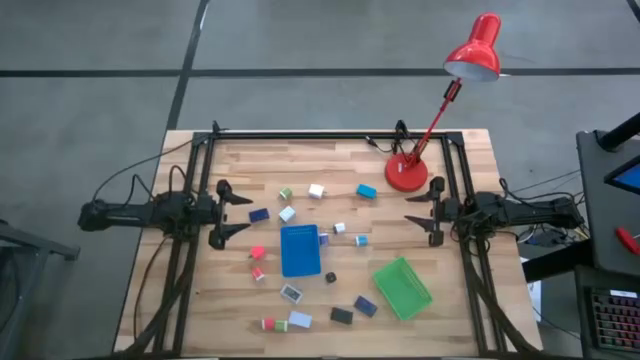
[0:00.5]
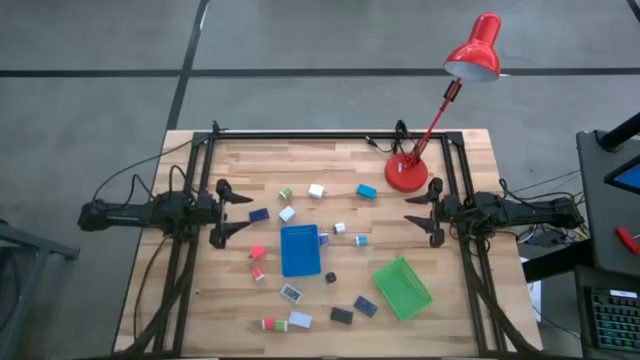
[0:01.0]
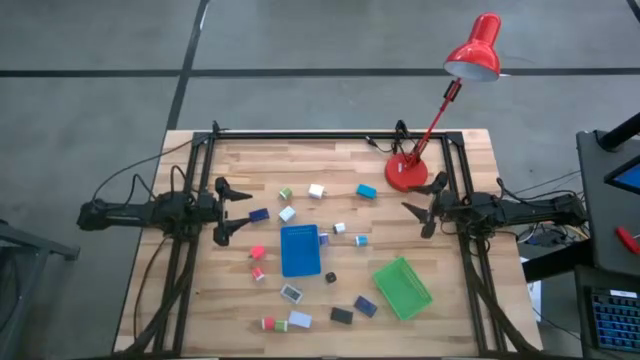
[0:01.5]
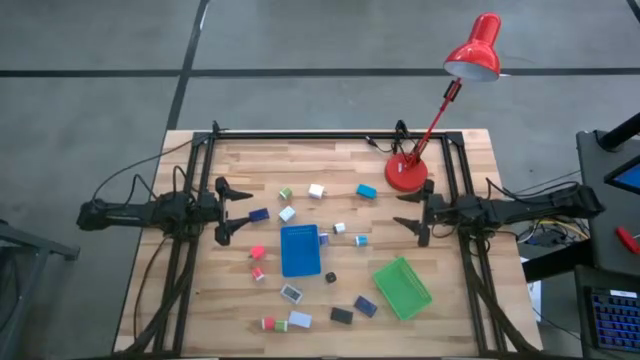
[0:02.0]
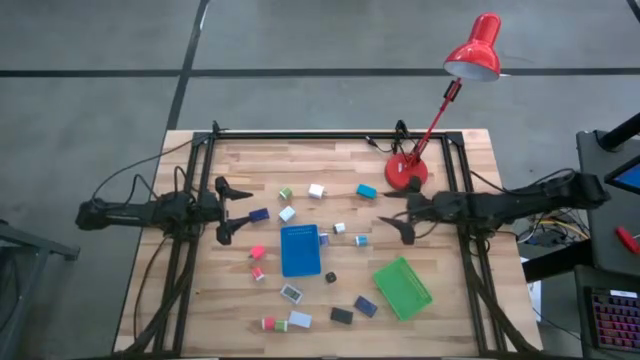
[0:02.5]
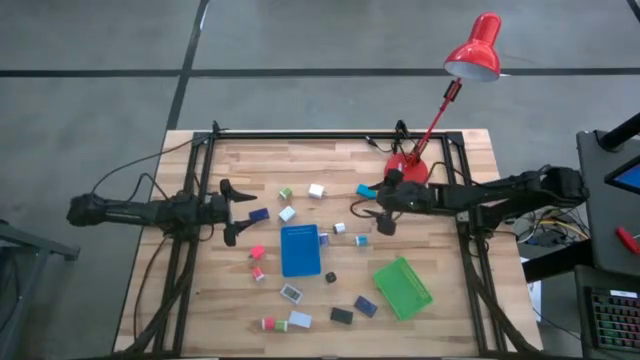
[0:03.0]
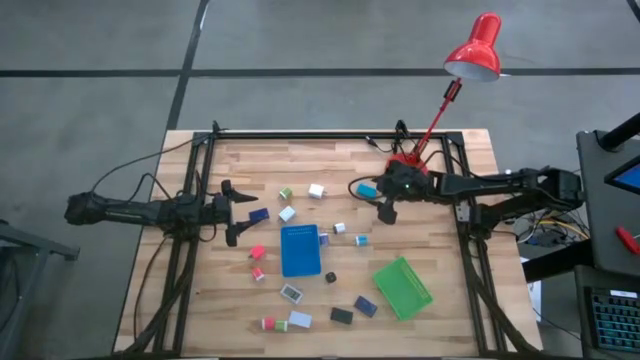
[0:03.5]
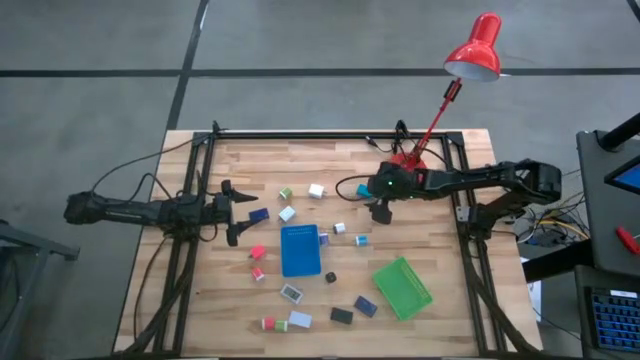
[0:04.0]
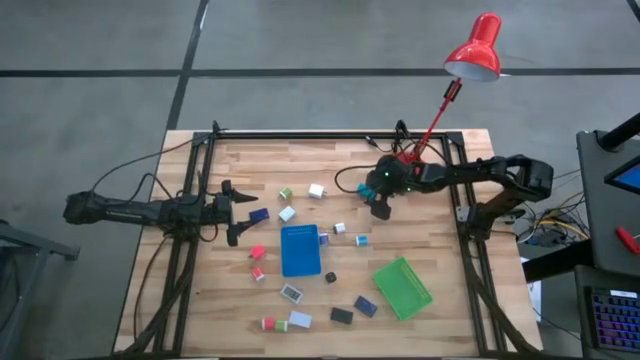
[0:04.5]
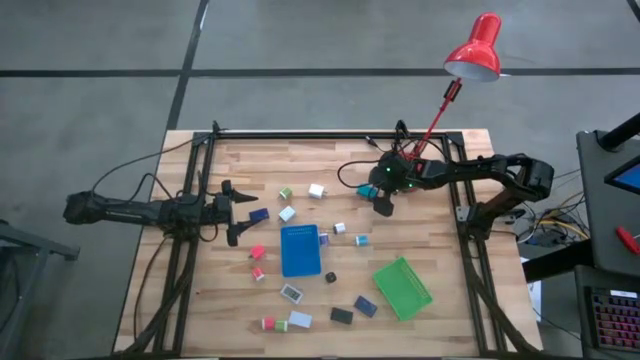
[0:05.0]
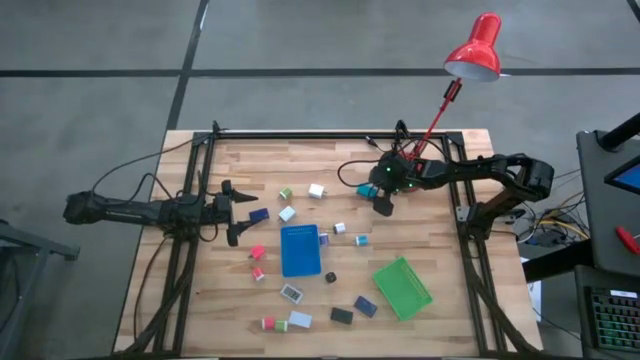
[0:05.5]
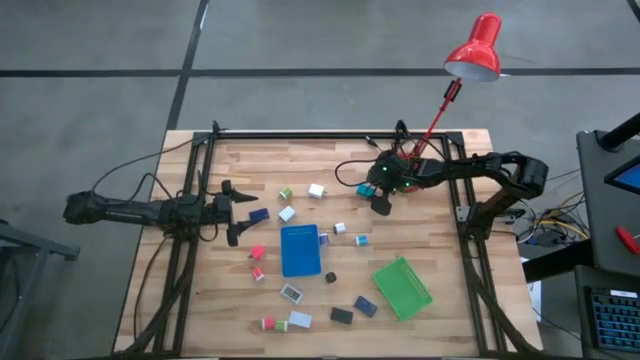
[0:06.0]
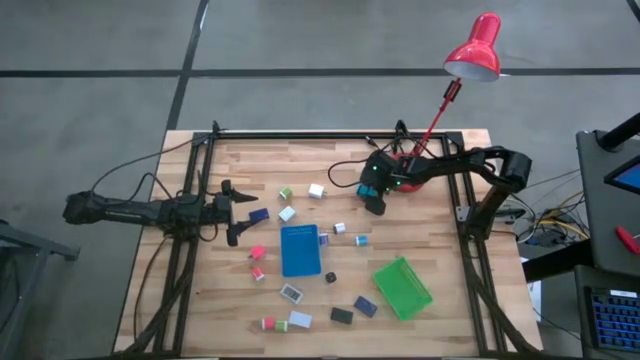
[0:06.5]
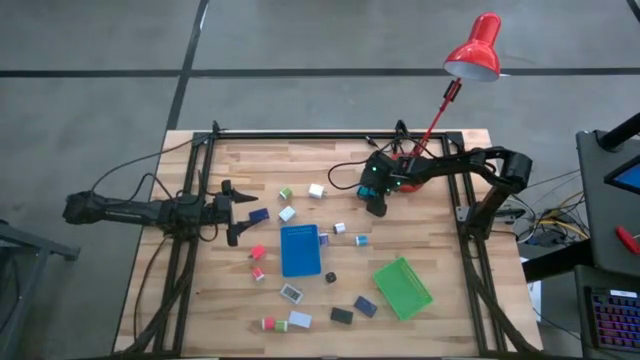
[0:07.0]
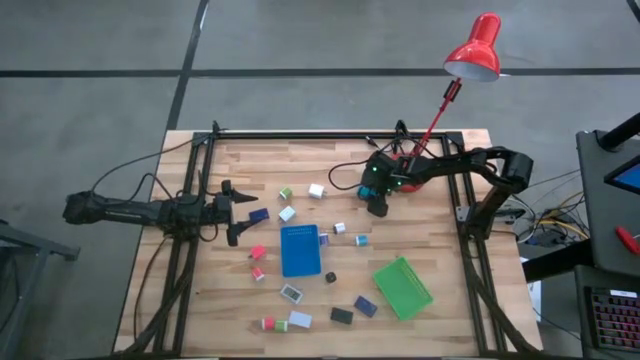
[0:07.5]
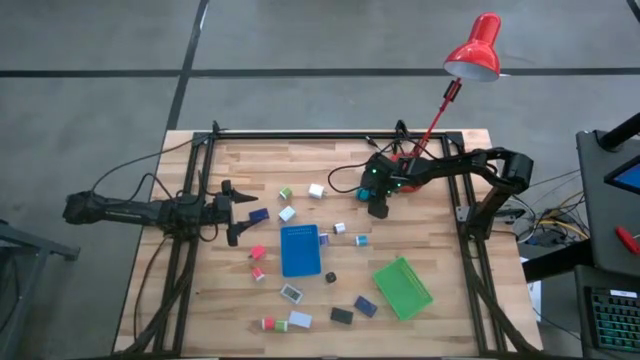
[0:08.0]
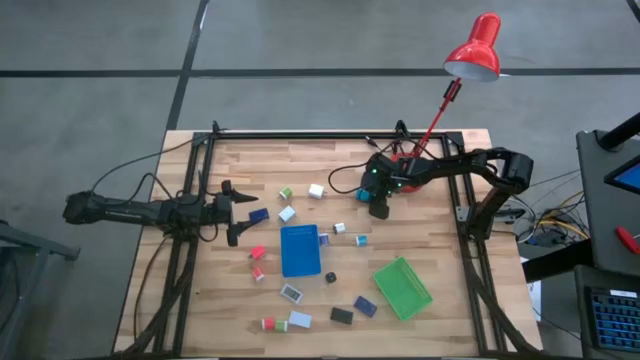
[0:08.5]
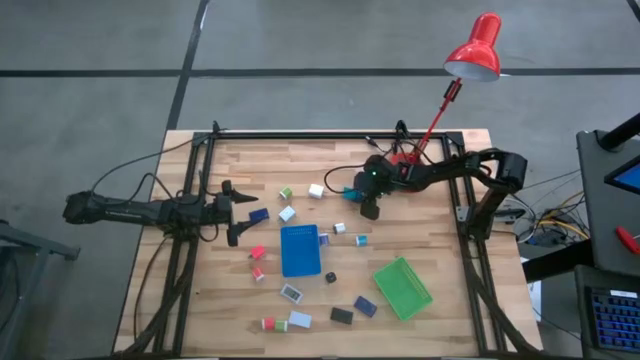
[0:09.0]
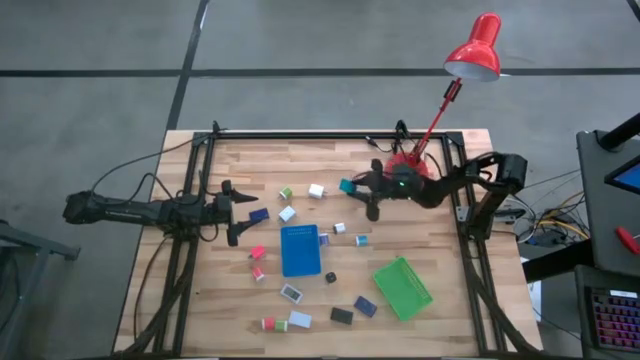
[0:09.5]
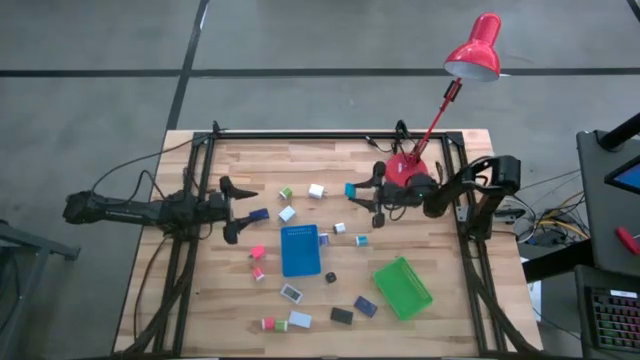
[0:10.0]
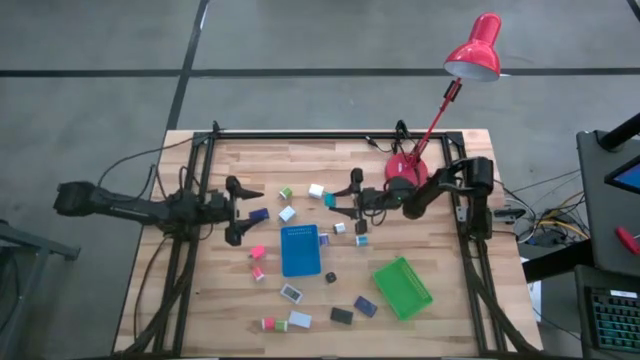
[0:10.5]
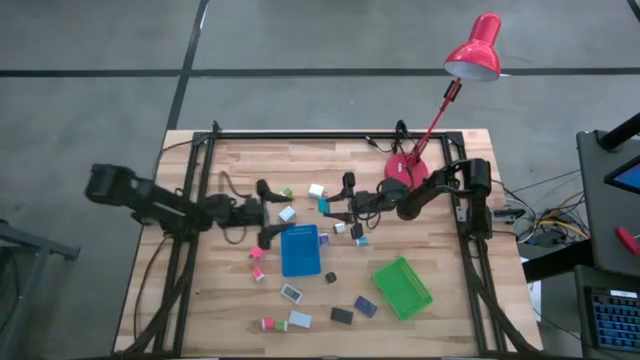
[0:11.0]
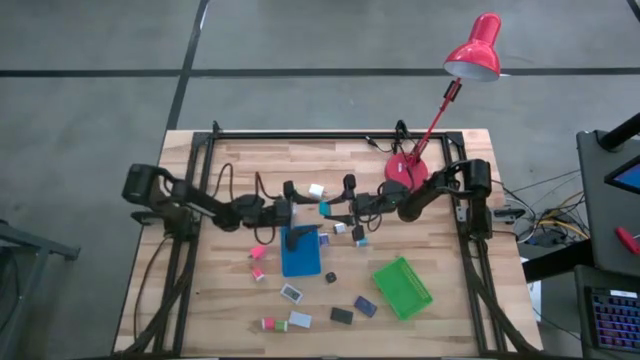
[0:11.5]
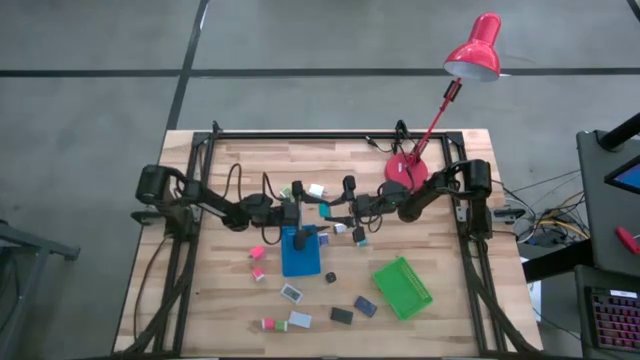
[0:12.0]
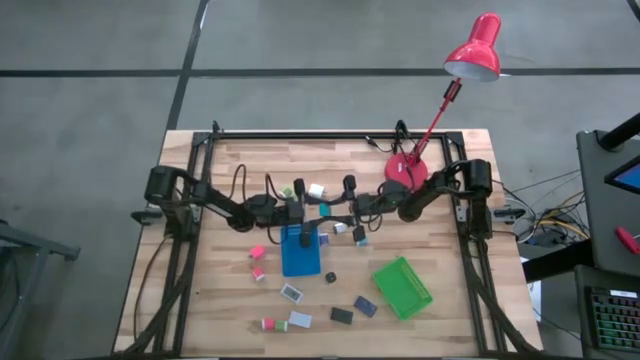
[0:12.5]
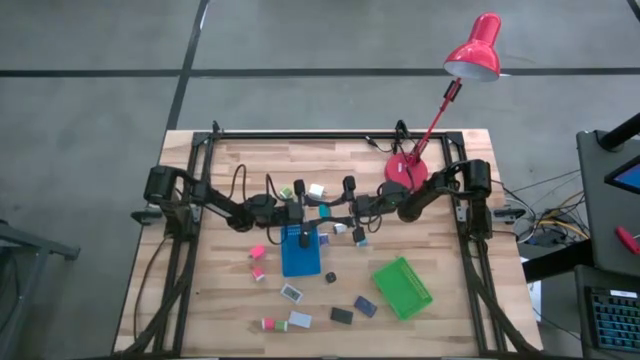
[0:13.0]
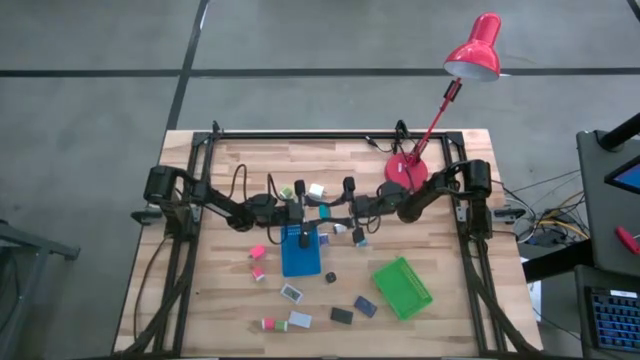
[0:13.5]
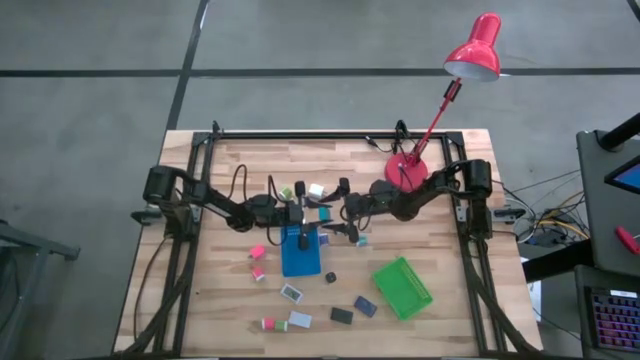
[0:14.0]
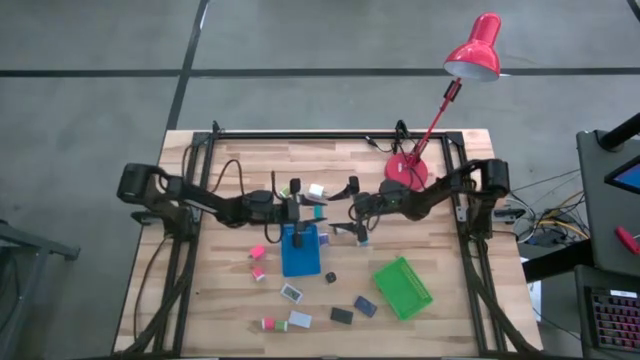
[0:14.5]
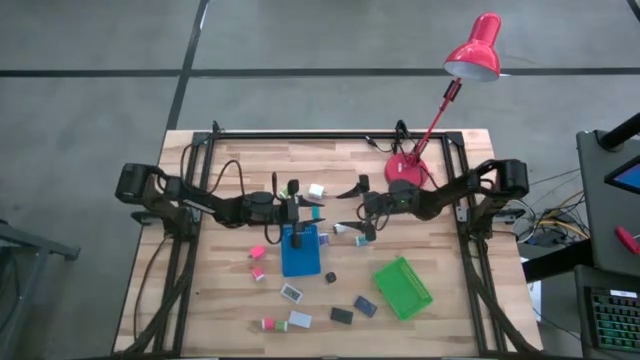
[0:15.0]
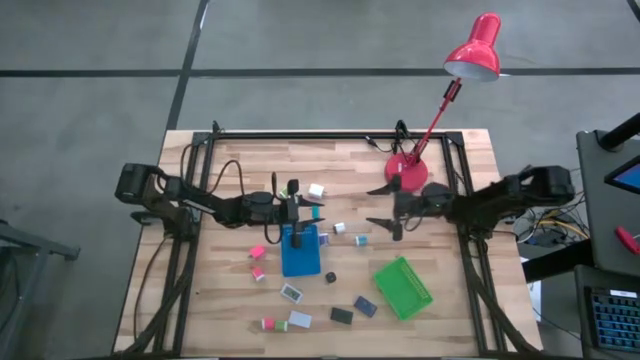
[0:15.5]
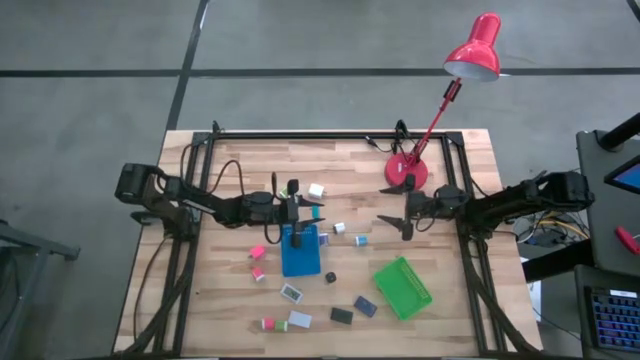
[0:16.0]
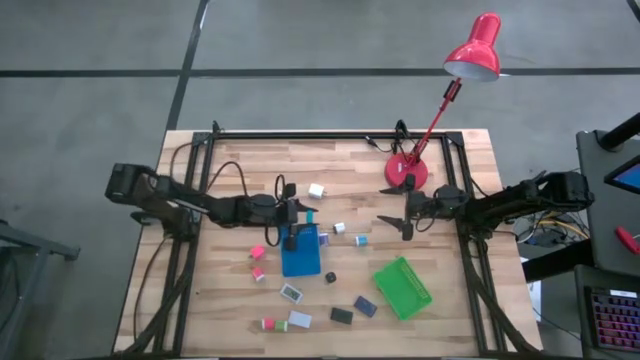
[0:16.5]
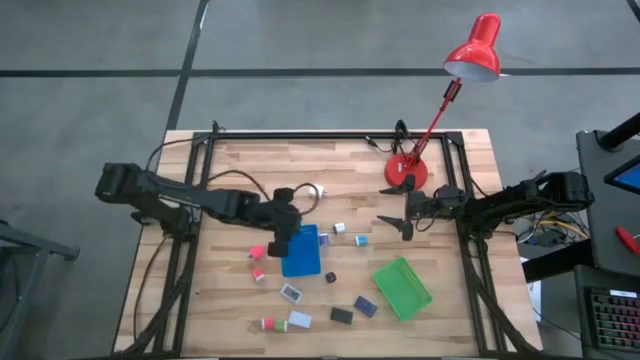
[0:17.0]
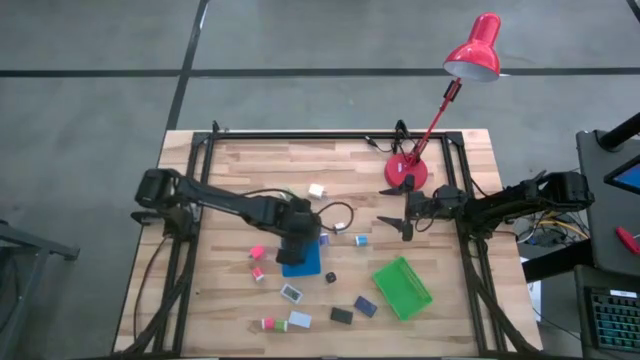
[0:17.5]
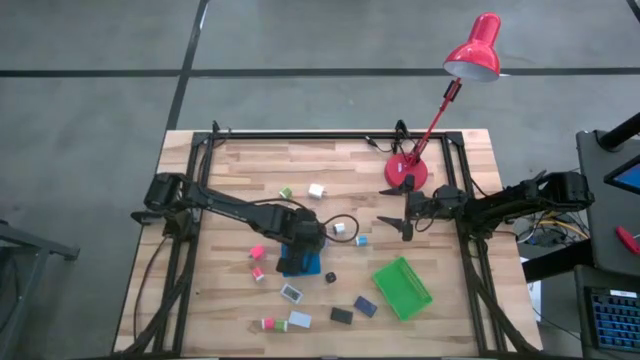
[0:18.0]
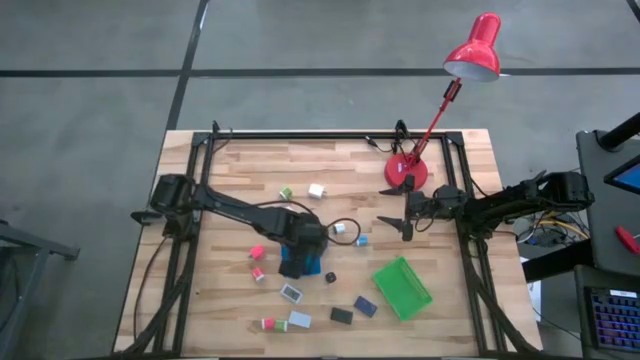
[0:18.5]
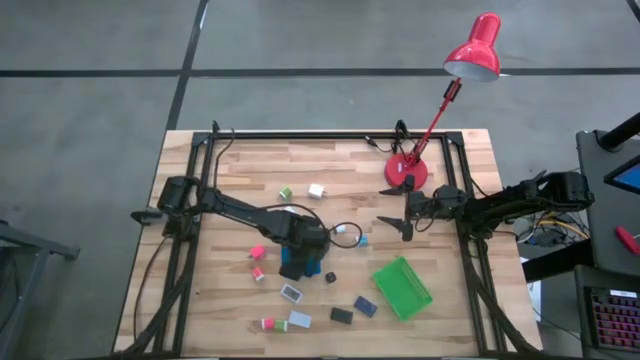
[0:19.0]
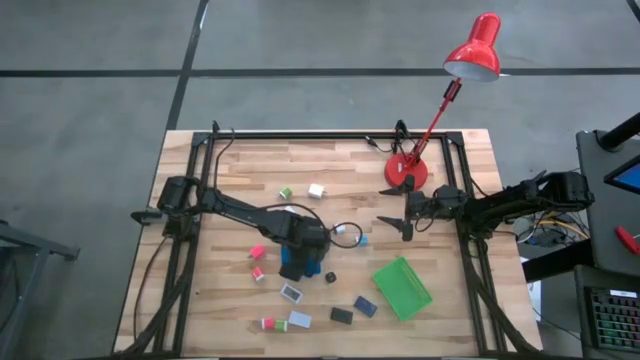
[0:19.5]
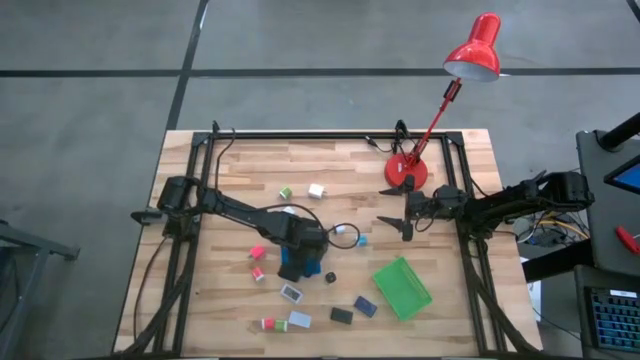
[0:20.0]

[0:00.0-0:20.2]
Task: Pick & Place Office items
Put the blue digital clock into the blue bin
